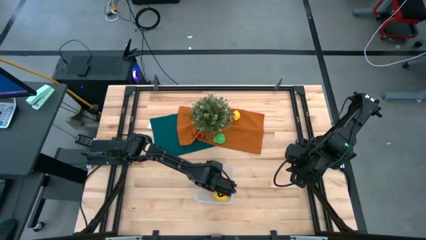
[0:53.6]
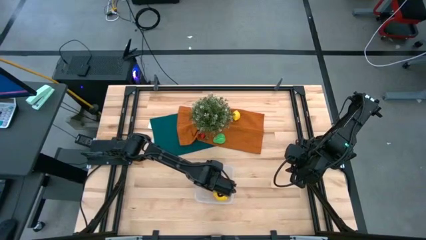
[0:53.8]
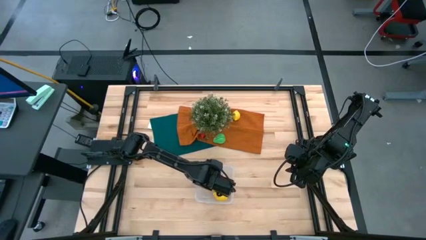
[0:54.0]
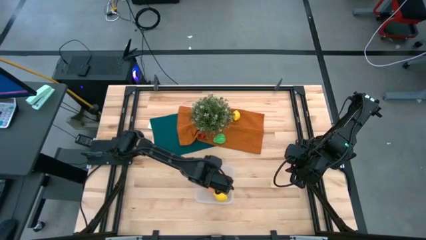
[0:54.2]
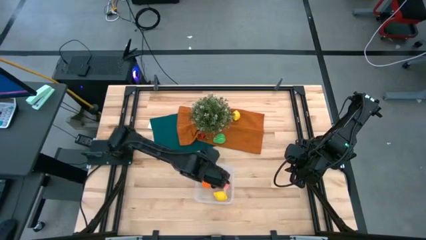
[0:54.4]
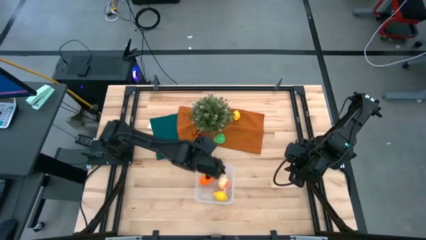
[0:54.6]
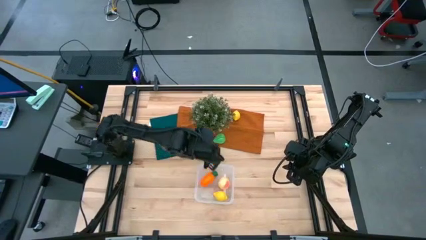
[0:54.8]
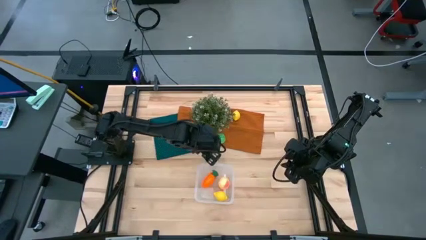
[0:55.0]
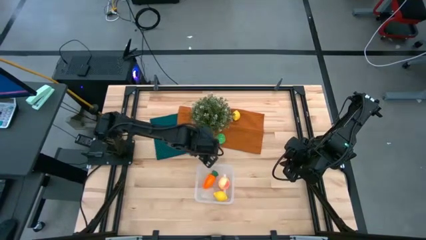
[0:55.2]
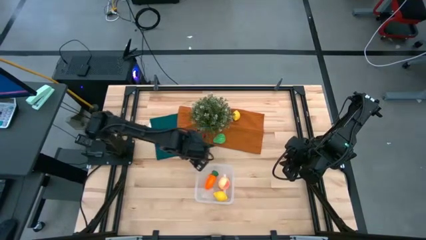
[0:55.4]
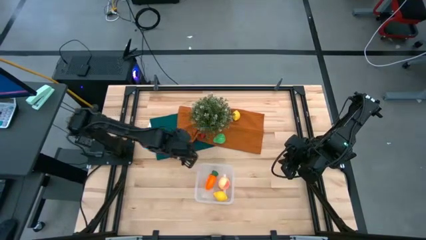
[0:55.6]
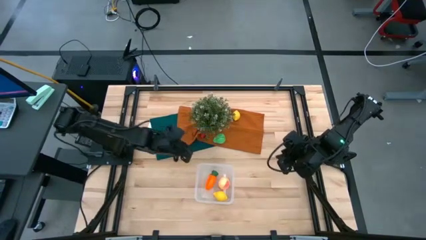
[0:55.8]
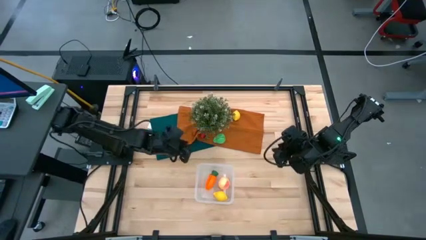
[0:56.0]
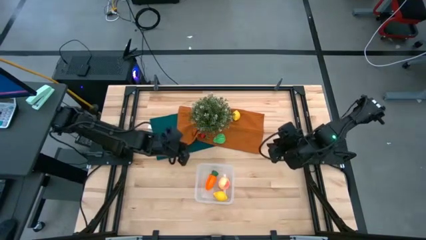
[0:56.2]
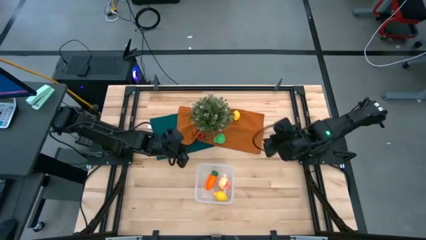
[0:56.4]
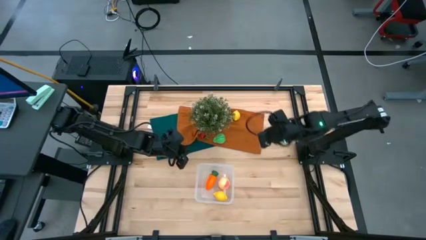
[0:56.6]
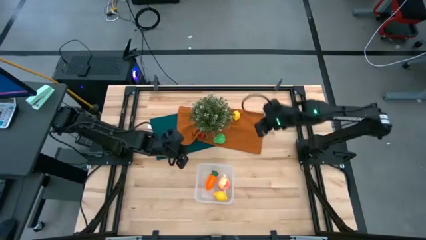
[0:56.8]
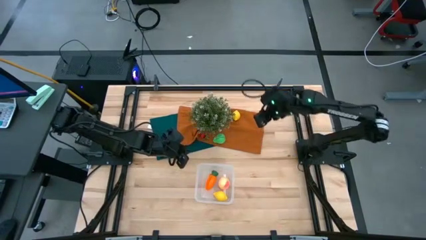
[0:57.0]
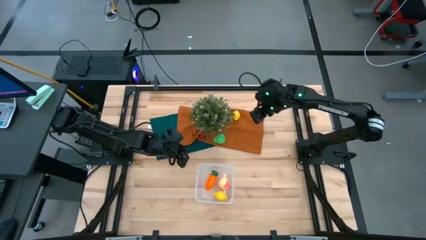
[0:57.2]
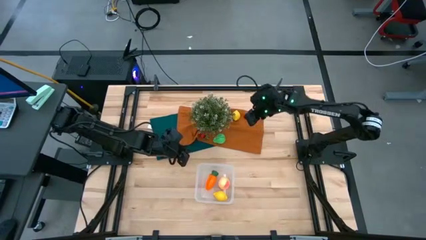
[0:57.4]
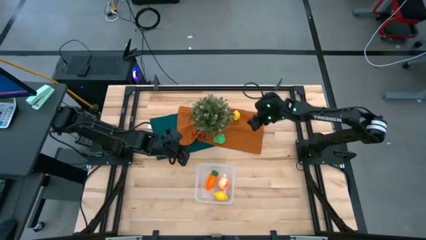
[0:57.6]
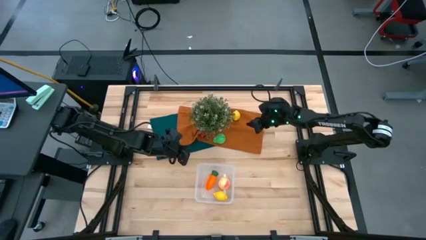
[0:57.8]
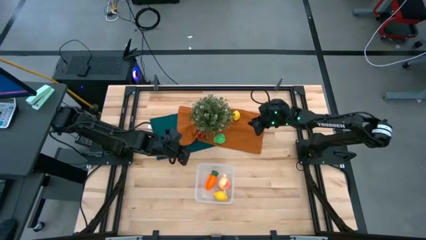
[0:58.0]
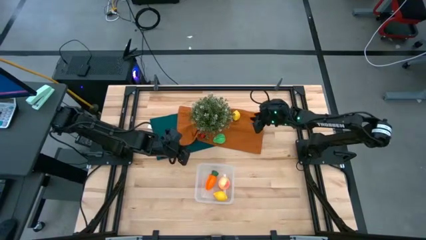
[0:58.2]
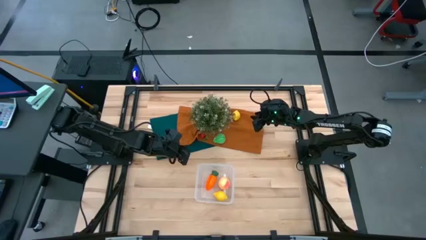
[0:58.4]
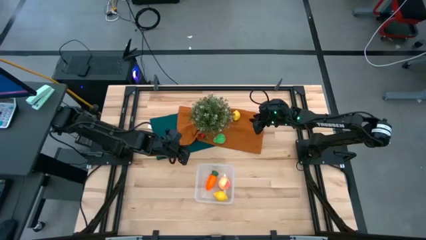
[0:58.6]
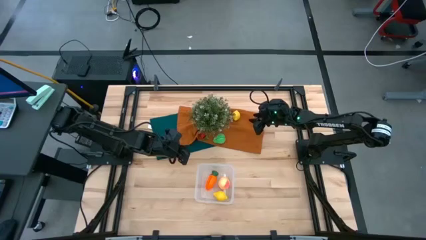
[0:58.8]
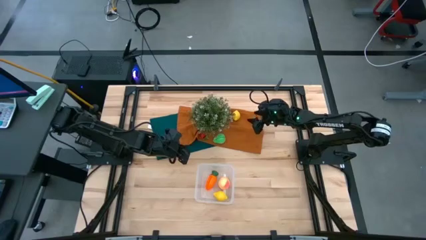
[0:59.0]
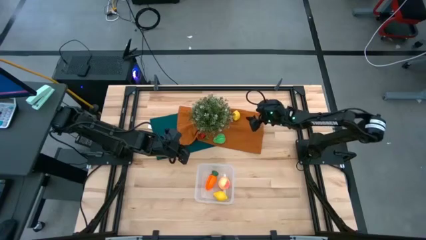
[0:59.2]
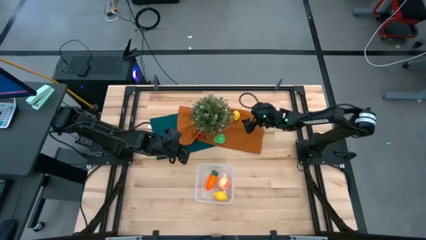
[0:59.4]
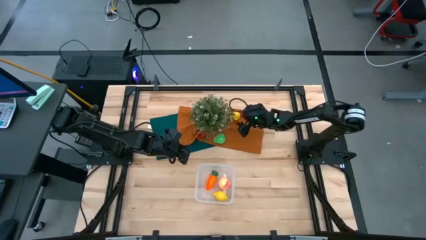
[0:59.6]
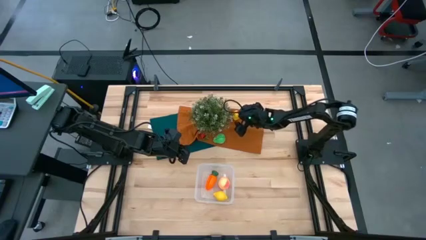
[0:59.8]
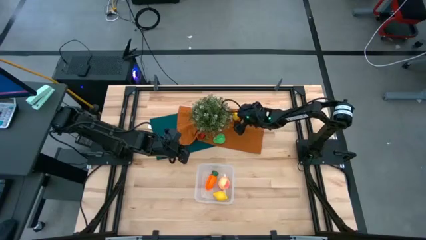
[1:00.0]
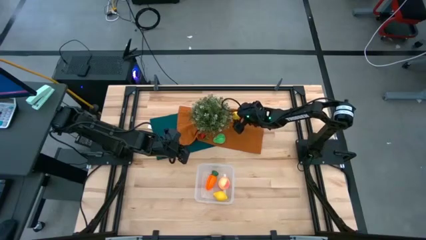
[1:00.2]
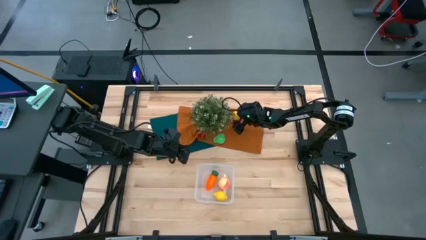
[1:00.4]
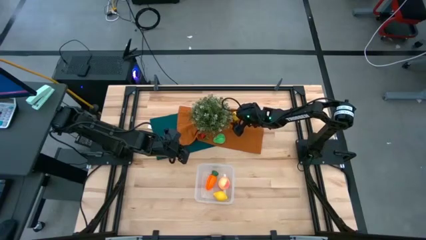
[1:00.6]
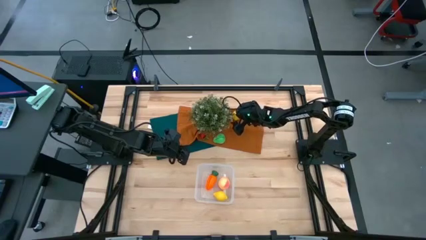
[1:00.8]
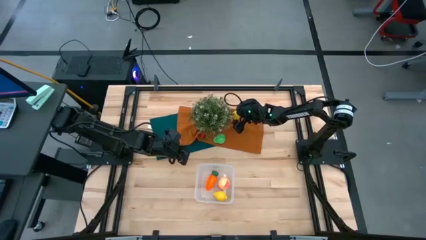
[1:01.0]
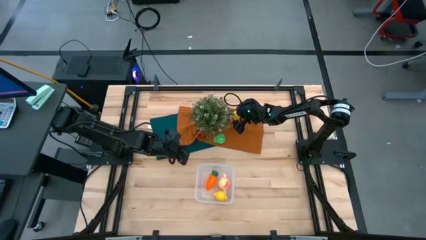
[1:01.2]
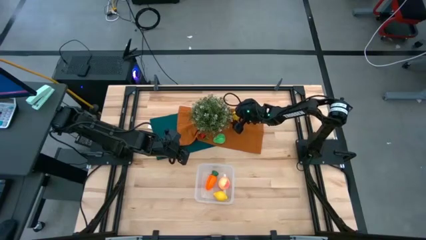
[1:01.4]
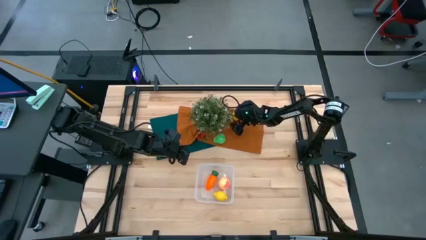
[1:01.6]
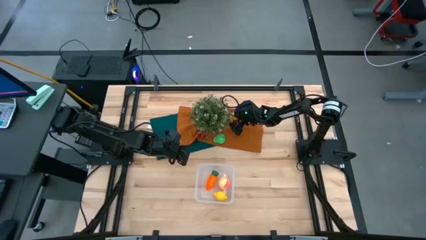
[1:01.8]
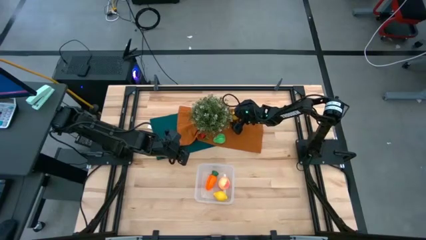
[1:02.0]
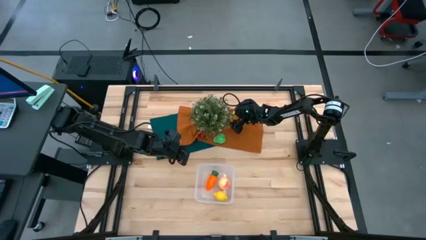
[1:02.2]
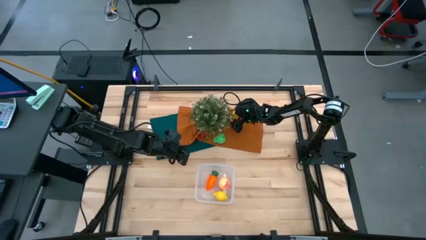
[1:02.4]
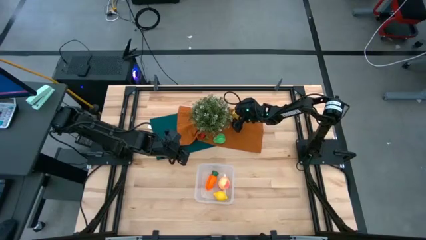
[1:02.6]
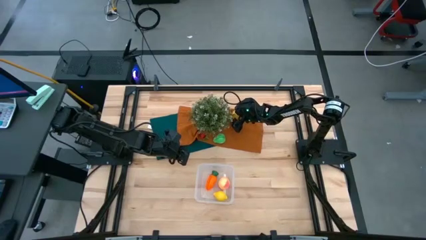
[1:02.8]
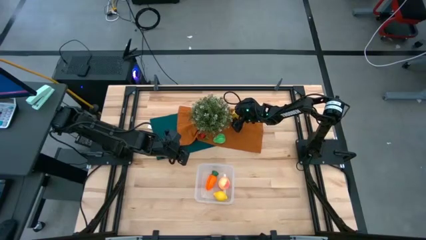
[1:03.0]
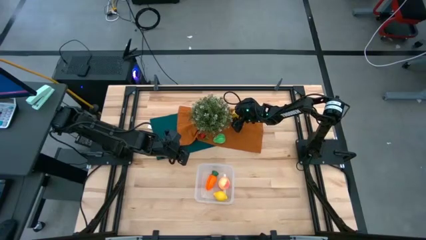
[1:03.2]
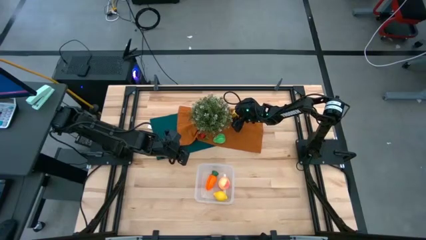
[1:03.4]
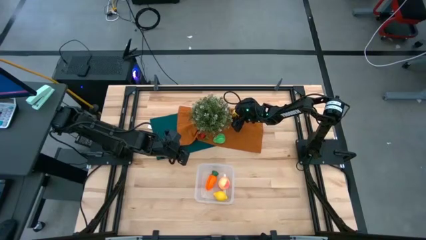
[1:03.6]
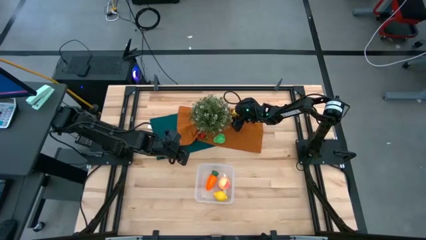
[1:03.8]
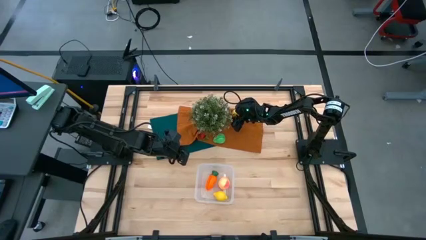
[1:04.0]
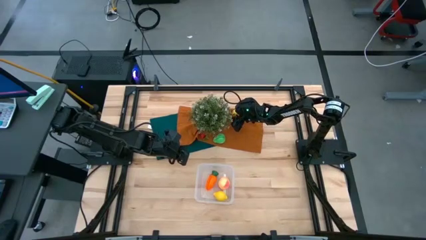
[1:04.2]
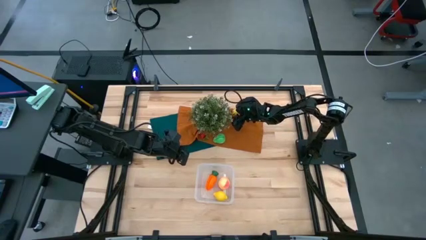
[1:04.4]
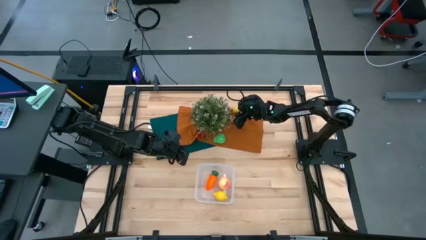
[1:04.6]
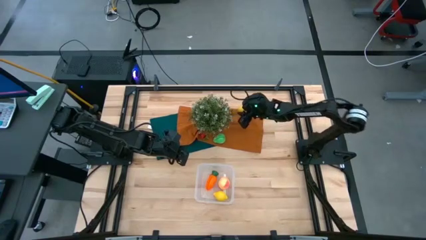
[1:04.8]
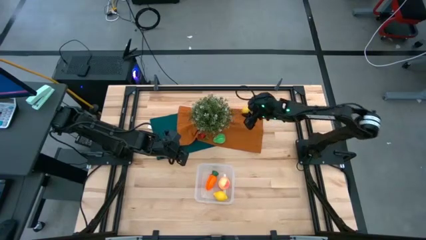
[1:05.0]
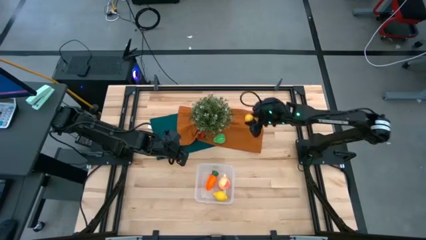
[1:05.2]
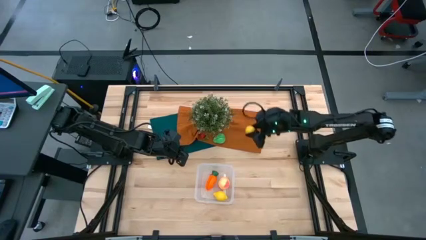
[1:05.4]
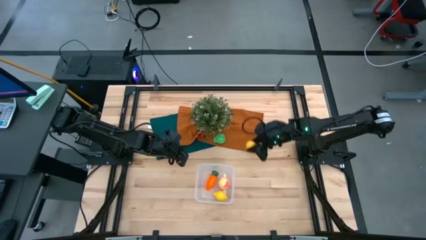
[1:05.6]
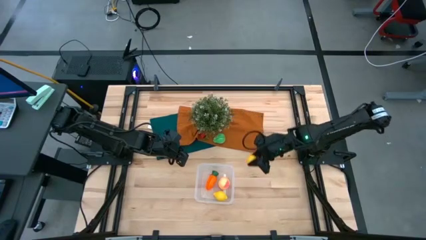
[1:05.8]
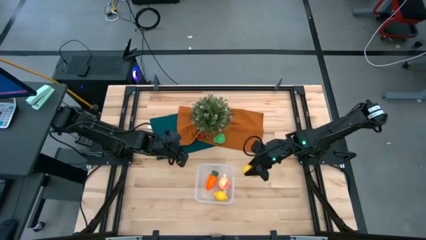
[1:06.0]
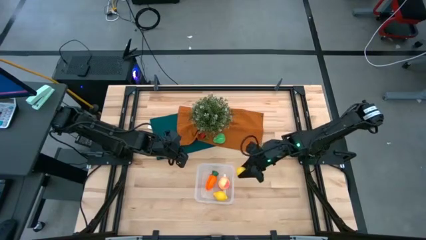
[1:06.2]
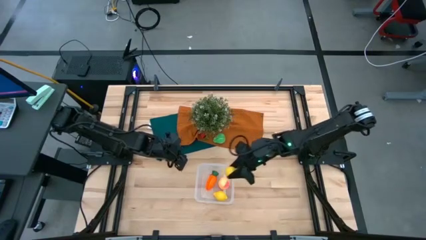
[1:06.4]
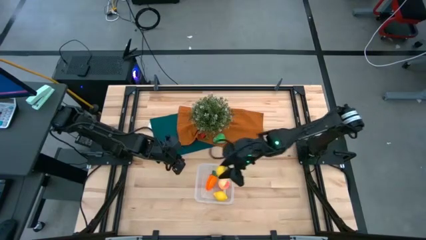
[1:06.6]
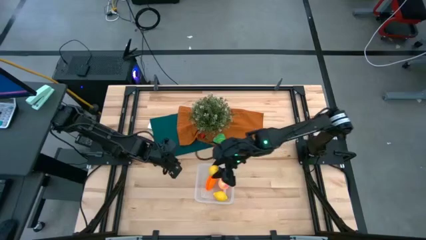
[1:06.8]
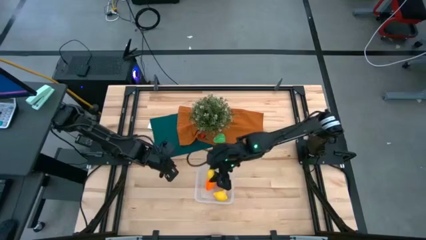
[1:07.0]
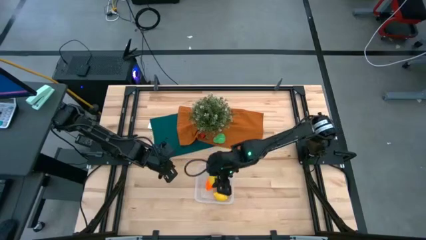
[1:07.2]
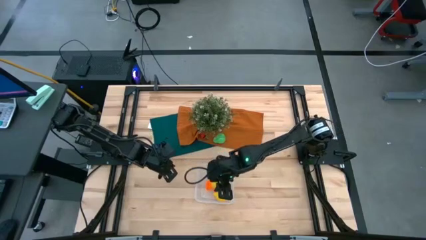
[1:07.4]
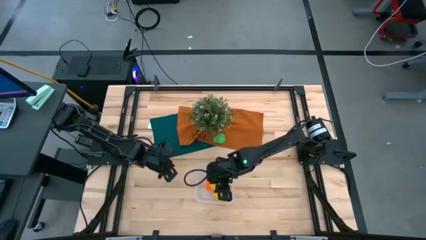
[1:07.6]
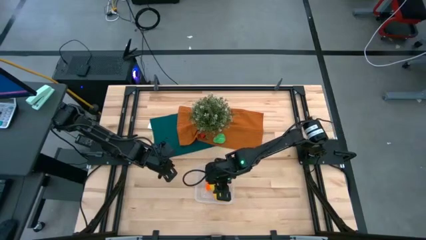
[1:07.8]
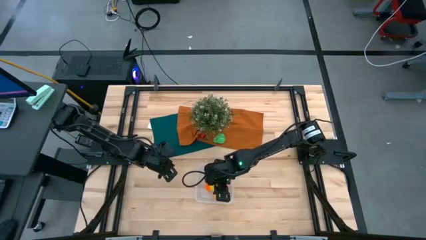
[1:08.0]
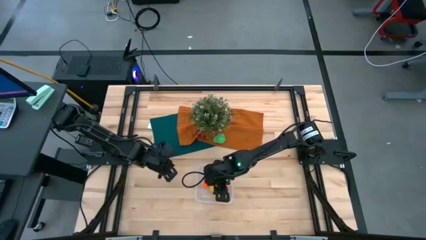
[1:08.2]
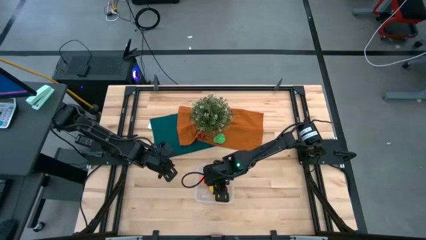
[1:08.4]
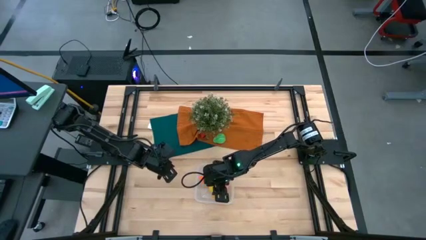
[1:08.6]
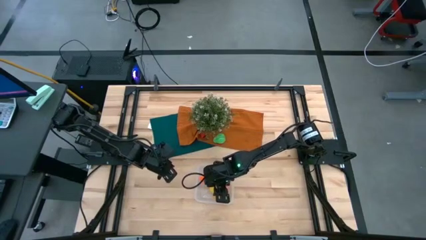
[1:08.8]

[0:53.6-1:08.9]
Task: Pick and placing Produce into tupperware
Put the lemon into the transparent bin
